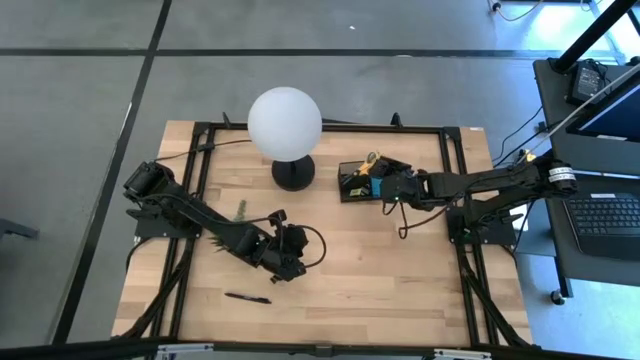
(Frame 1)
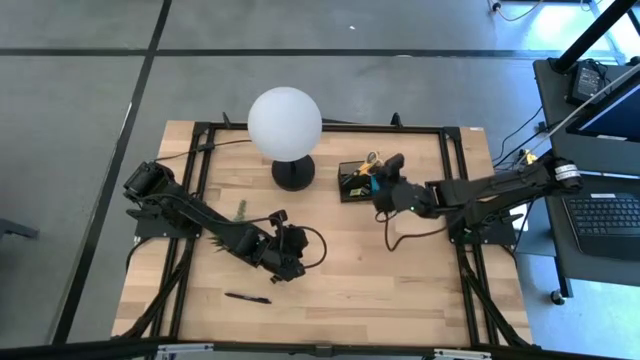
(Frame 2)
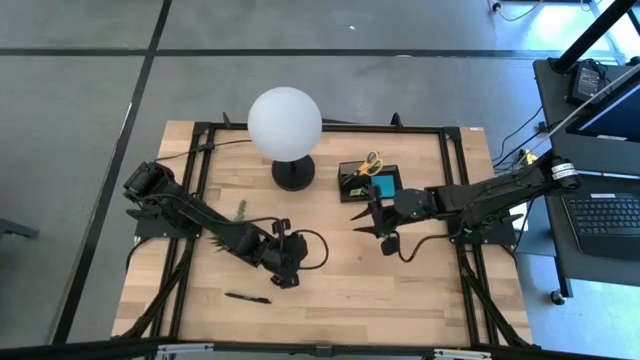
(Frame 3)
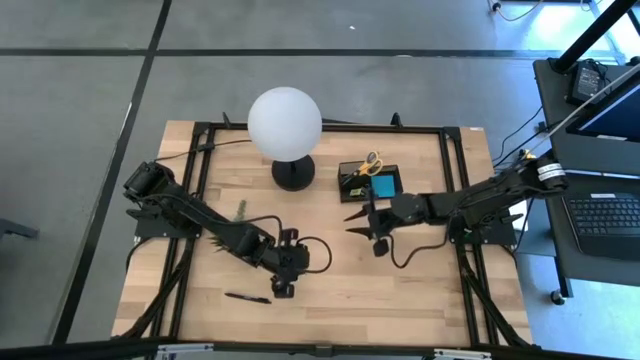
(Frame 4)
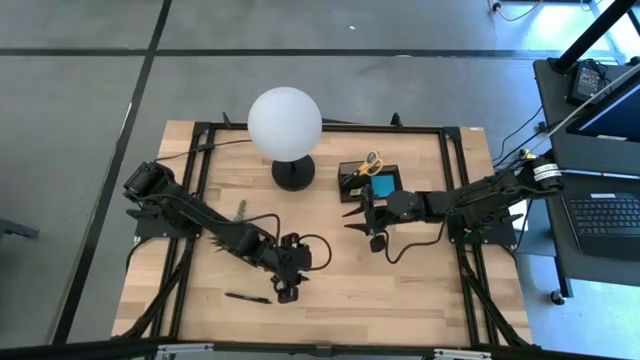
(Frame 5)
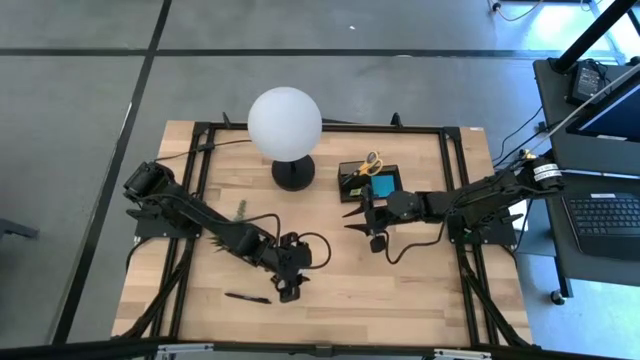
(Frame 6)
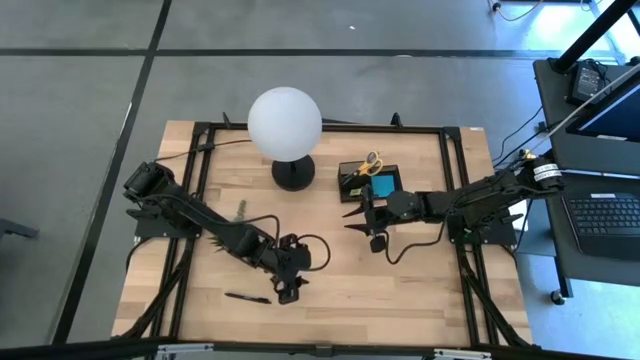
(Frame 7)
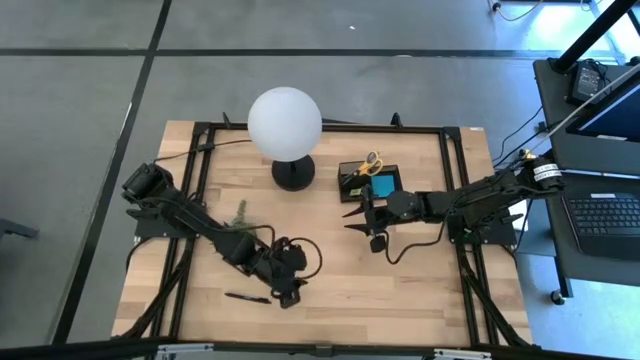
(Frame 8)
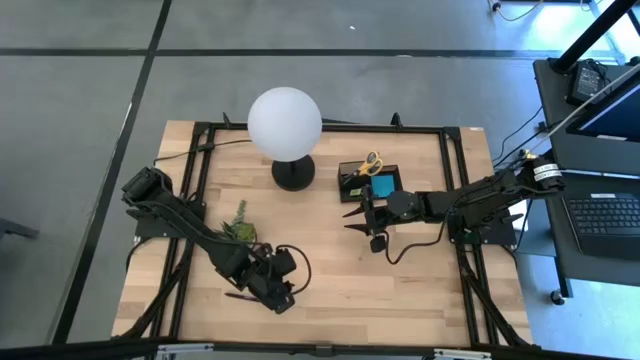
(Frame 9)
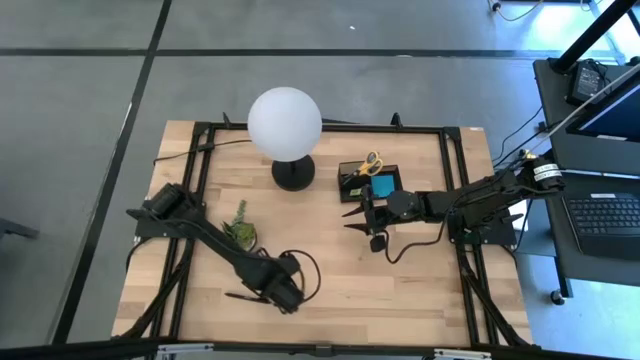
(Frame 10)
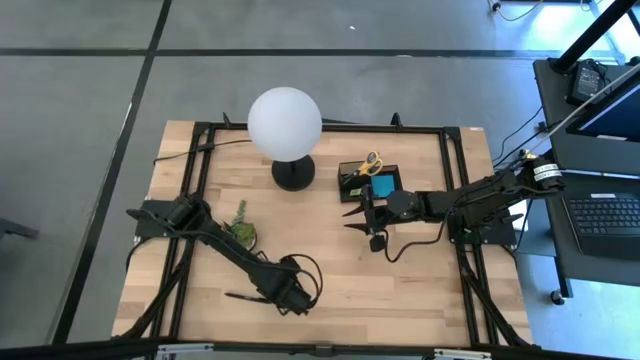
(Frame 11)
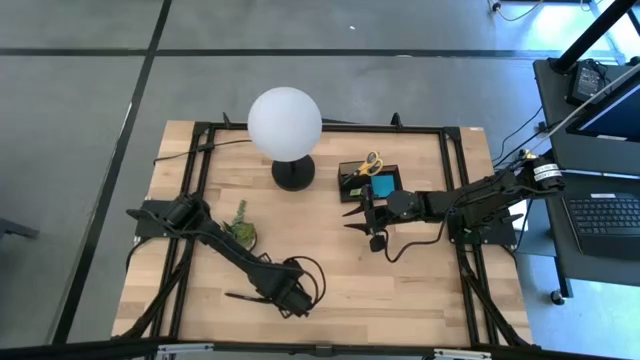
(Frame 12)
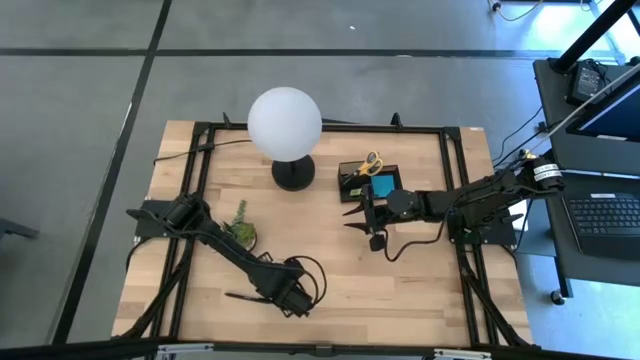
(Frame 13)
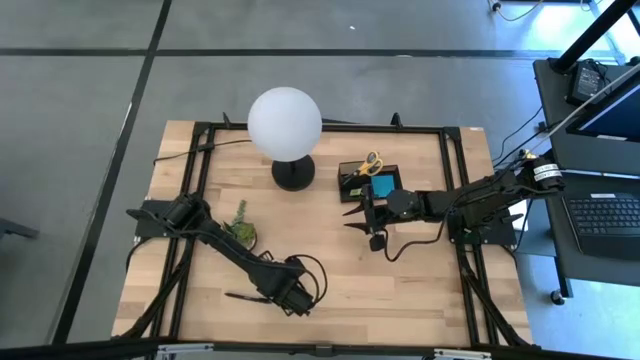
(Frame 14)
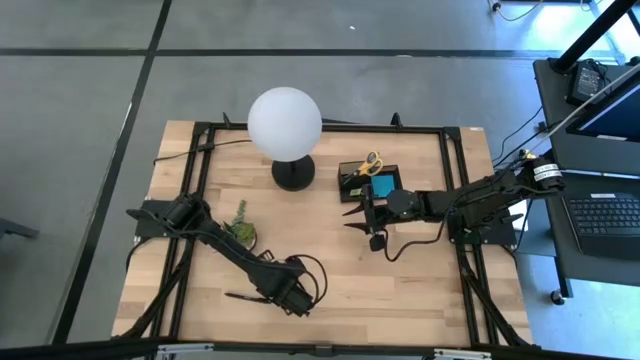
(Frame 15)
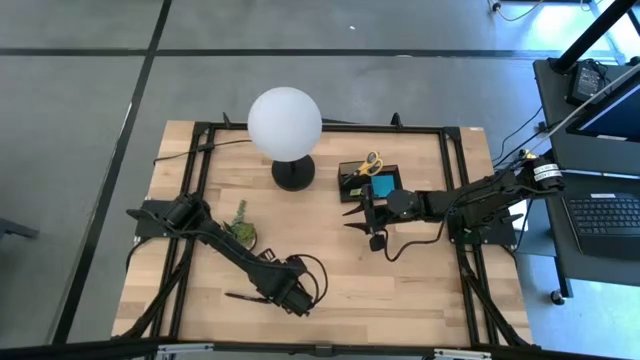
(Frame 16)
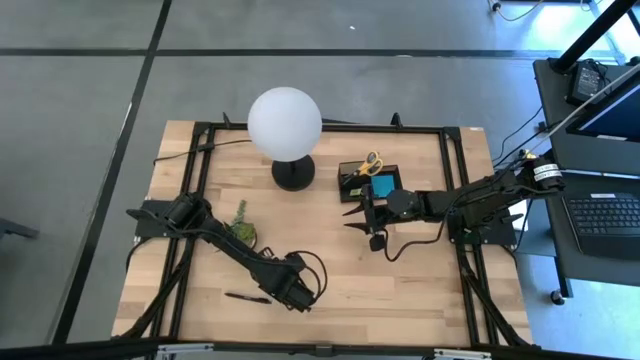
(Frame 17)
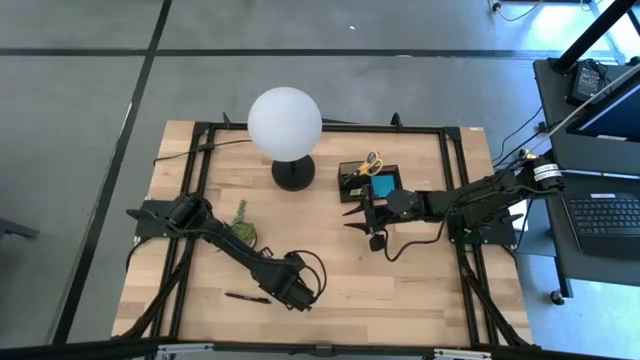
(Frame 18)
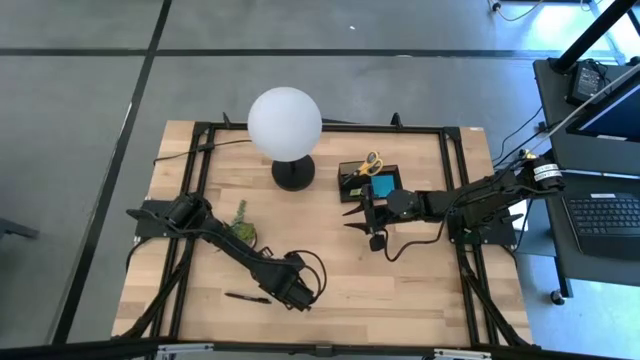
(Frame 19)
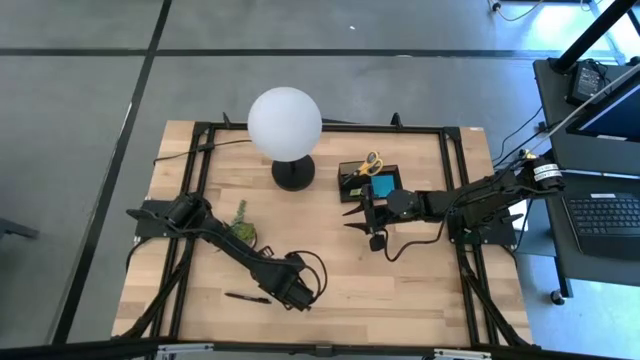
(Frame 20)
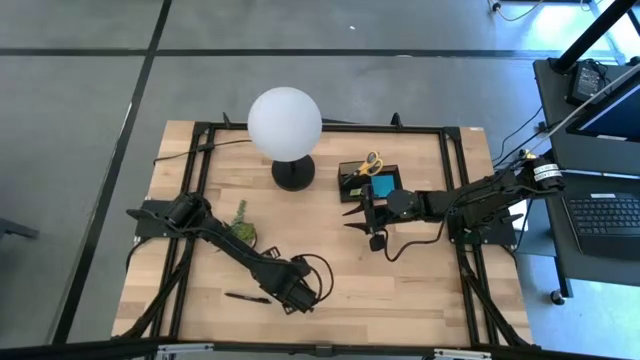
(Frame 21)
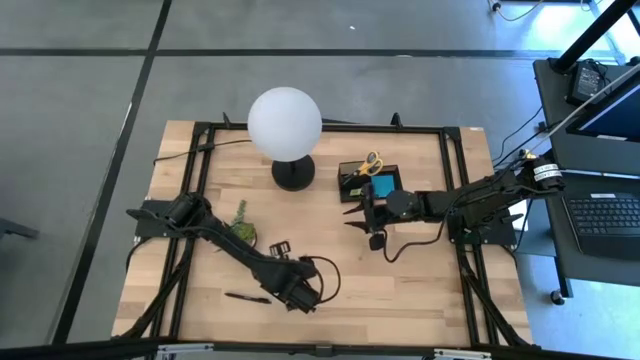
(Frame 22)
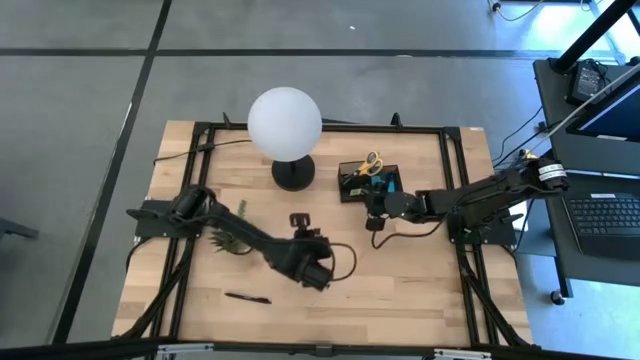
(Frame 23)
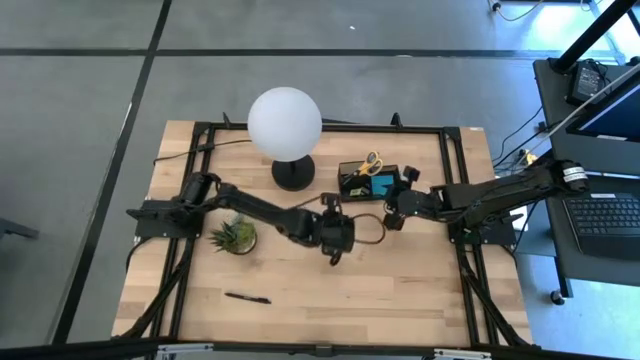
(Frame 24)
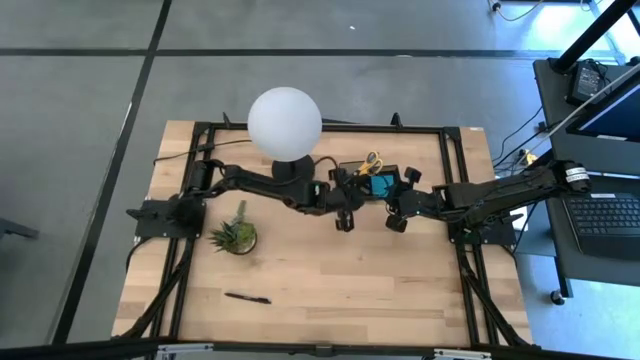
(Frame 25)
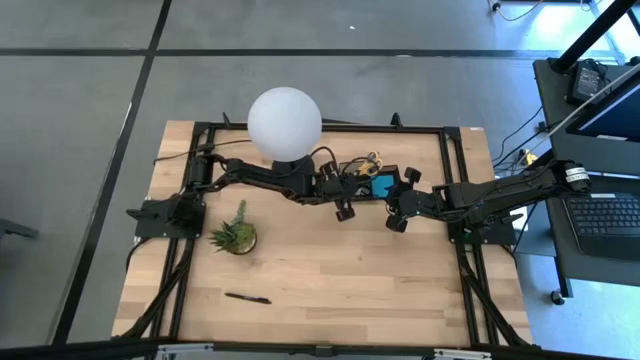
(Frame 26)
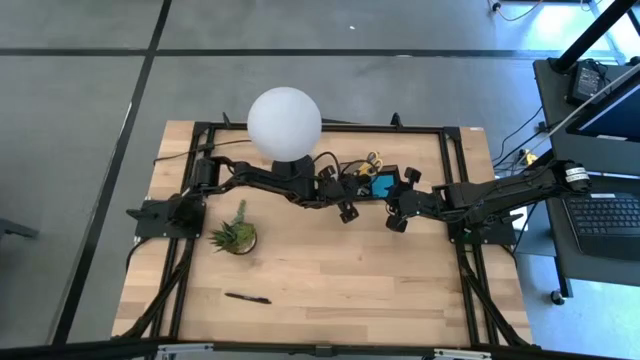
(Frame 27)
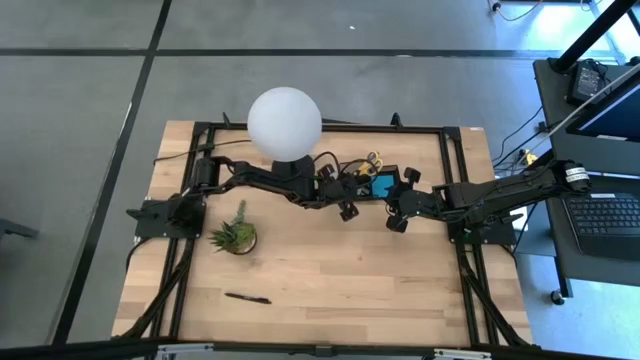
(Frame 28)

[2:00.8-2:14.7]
Task: Pick and place office supplies into organizer
Put the black binder clip into the desk organizer

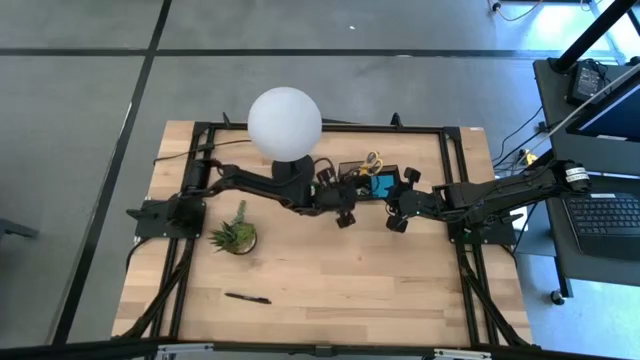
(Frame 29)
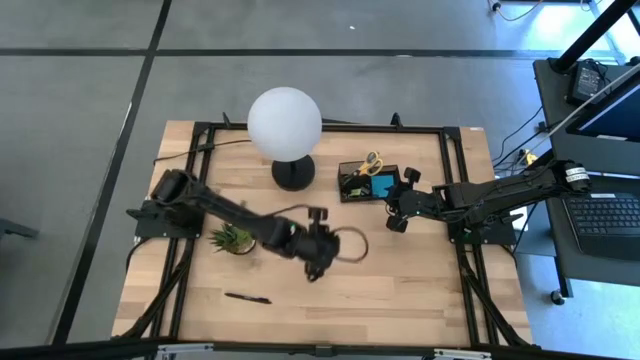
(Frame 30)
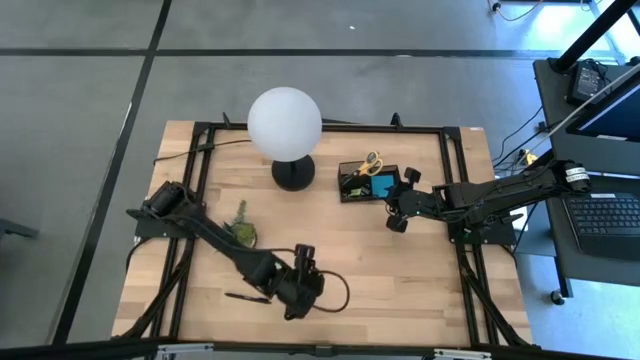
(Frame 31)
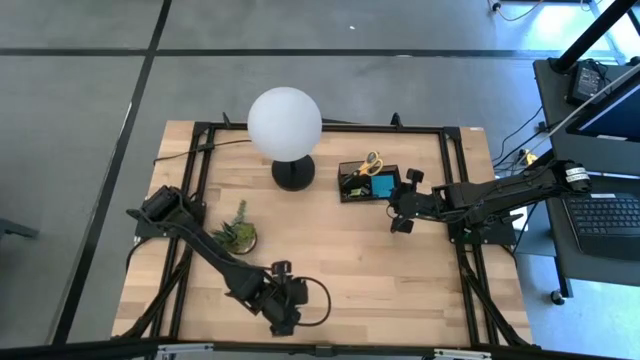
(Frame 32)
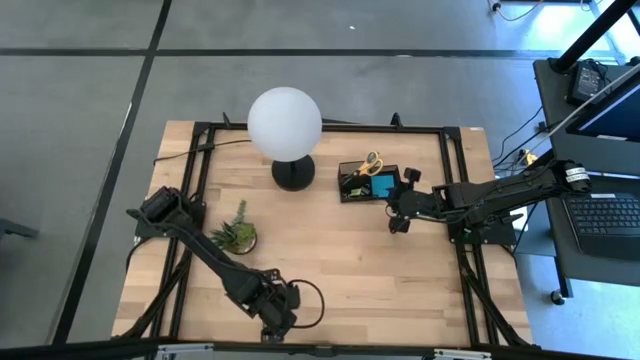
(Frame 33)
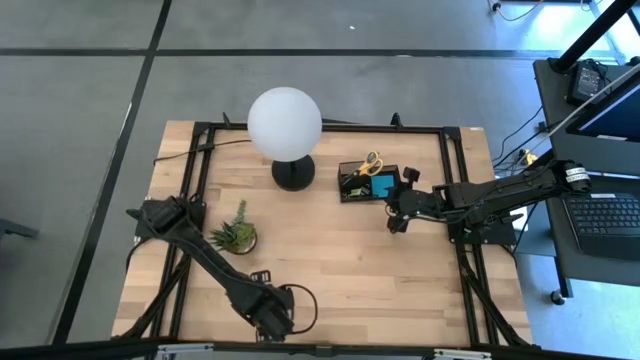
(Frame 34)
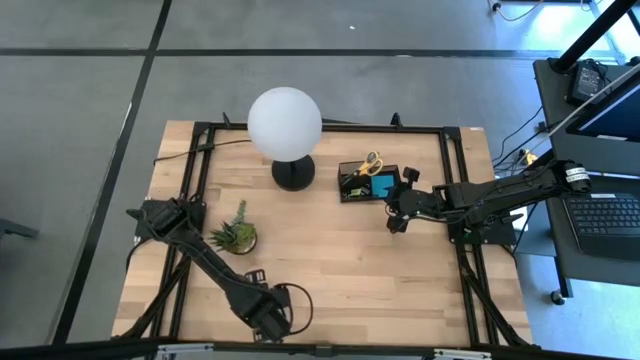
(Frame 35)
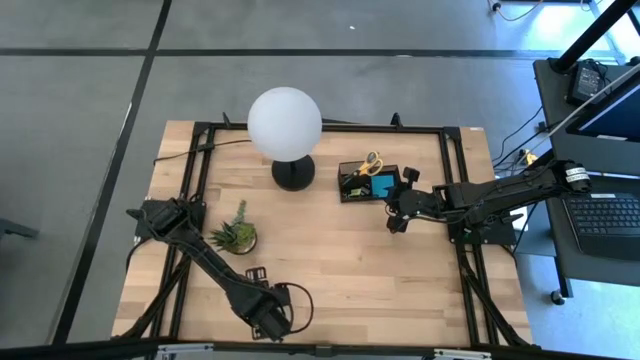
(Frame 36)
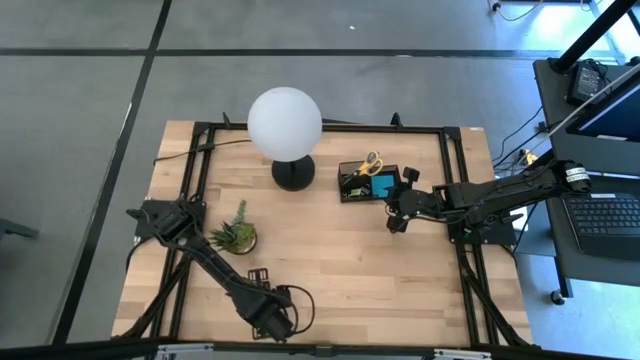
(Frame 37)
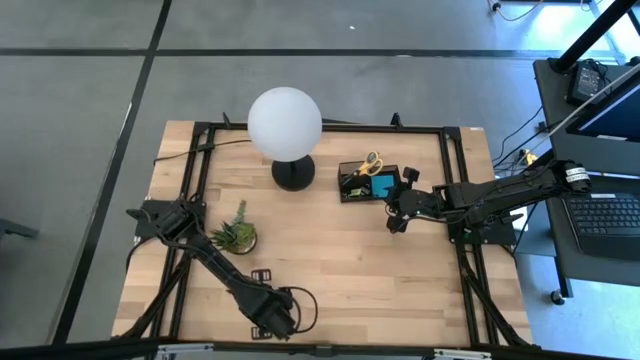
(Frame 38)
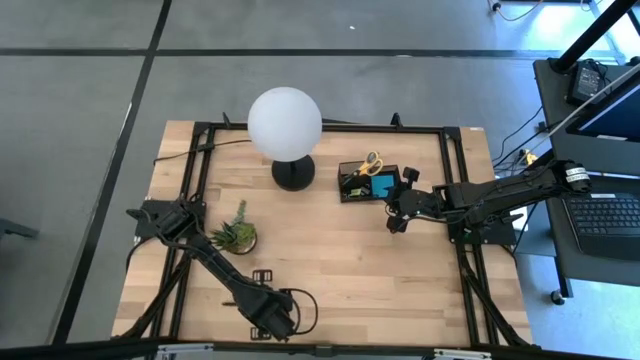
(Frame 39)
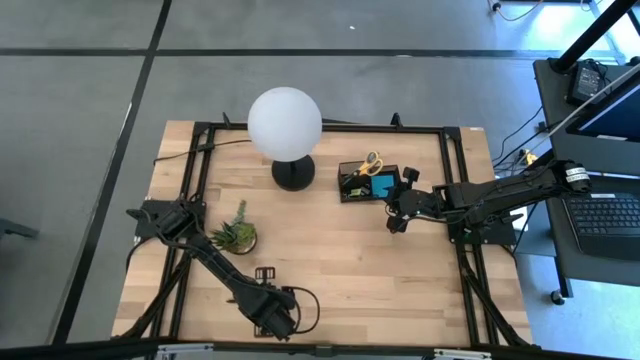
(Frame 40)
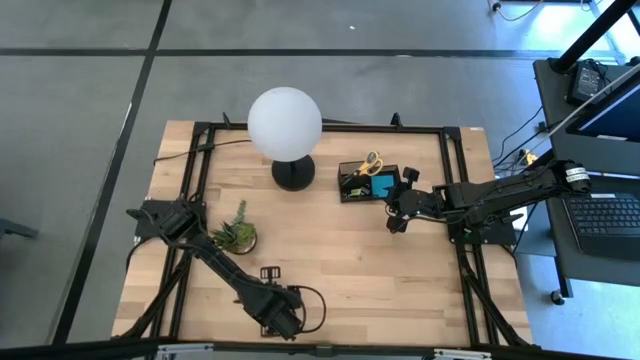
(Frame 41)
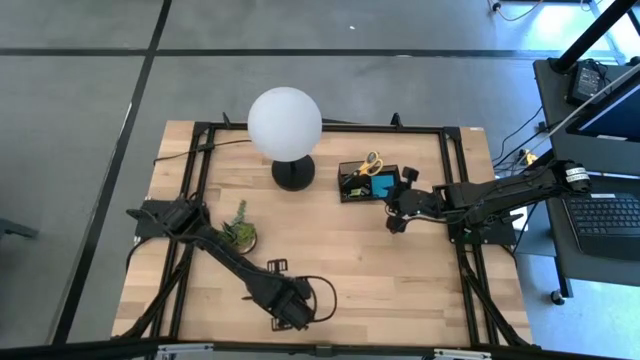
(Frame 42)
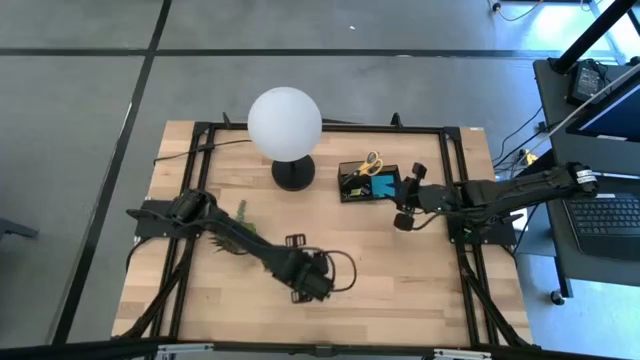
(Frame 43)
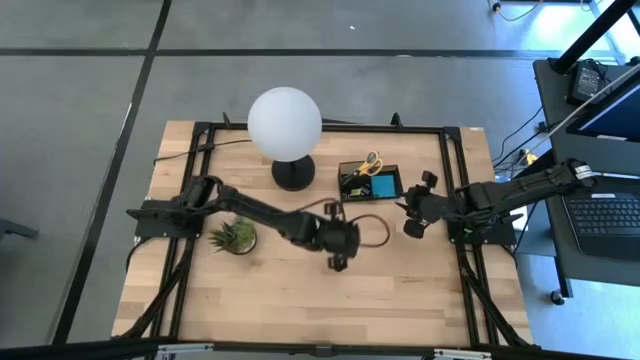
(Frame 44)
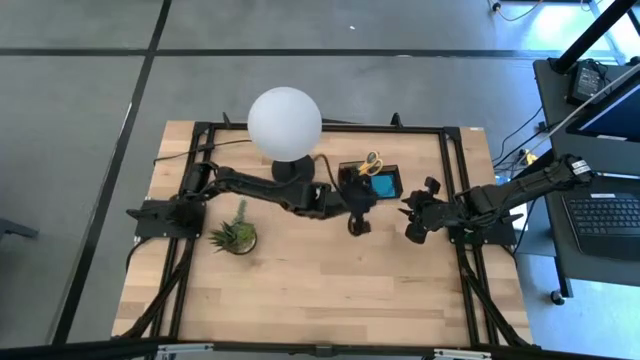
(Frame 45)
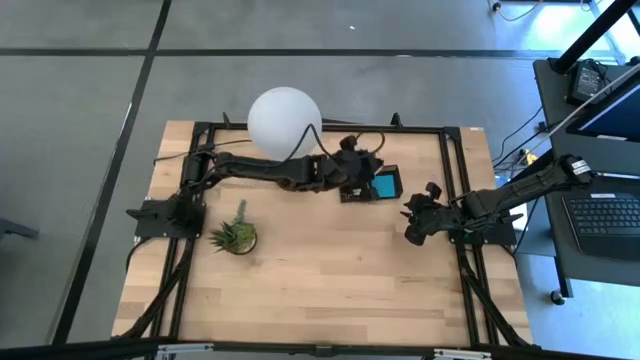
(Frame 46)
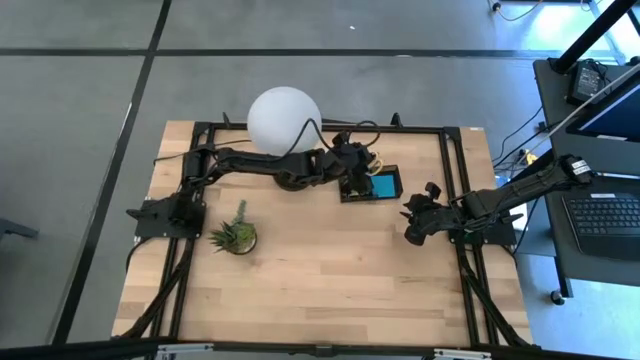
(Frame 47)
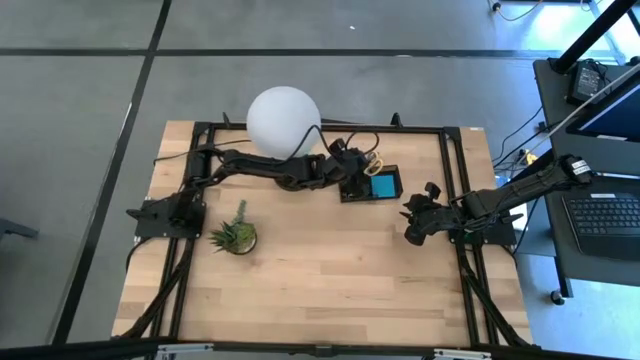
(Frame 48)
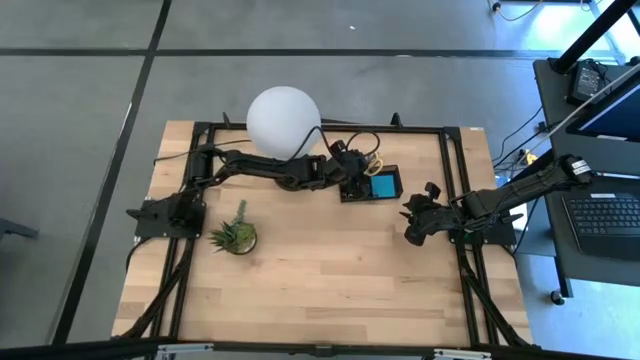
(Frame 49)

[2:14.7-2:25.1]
Put the black pen into the desk organizer
